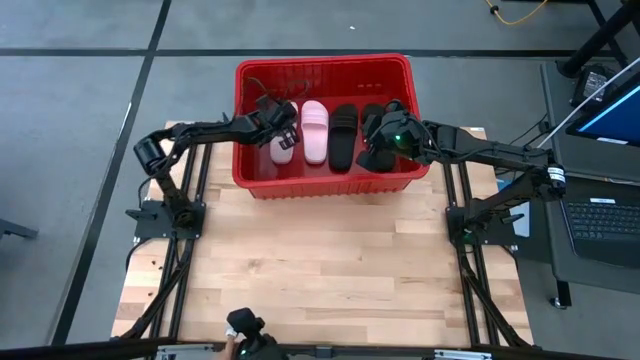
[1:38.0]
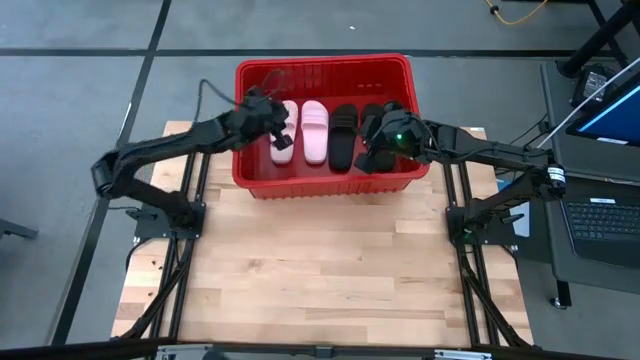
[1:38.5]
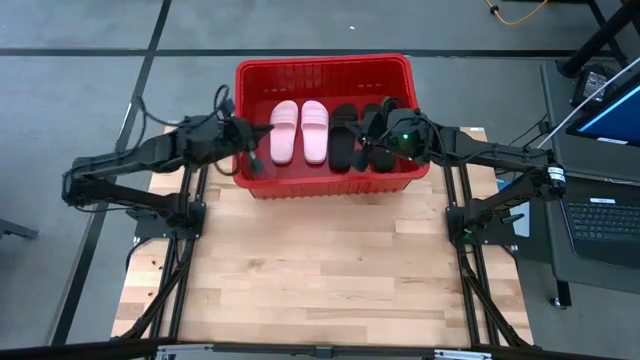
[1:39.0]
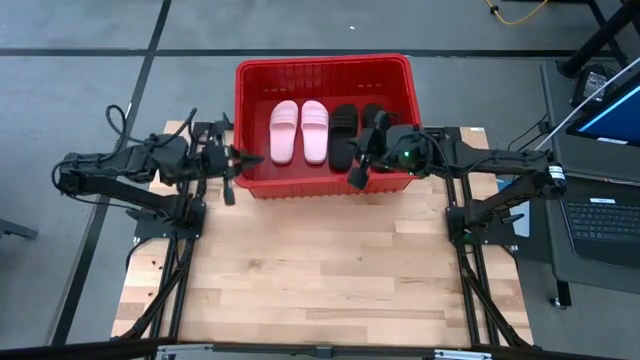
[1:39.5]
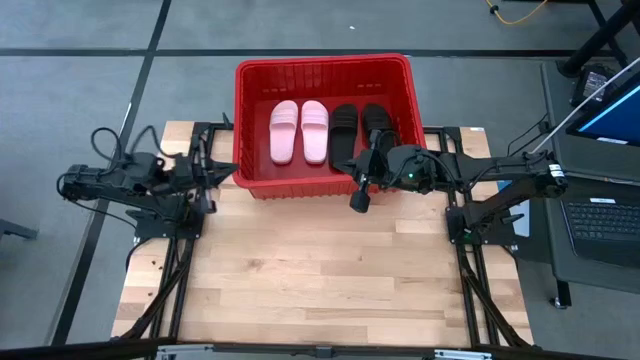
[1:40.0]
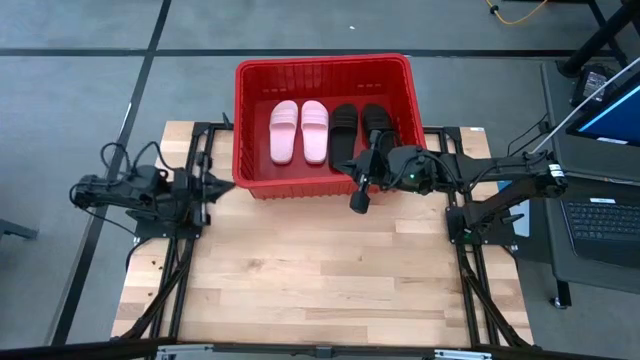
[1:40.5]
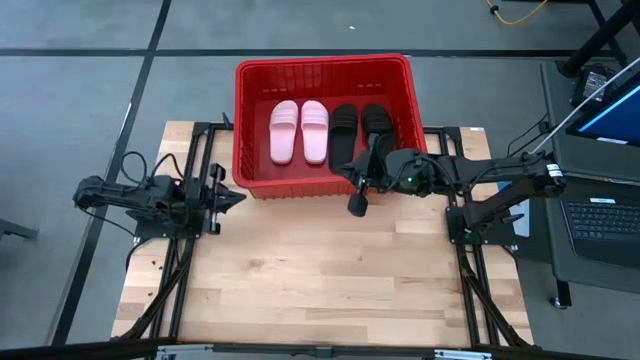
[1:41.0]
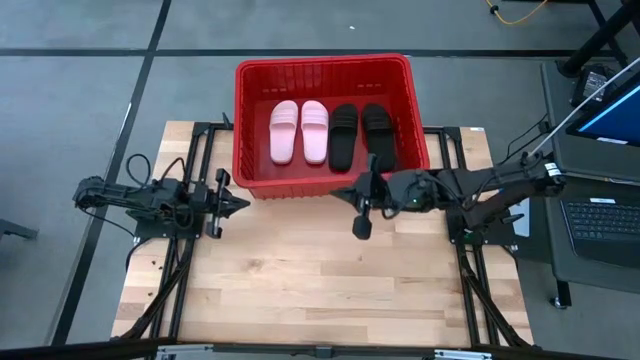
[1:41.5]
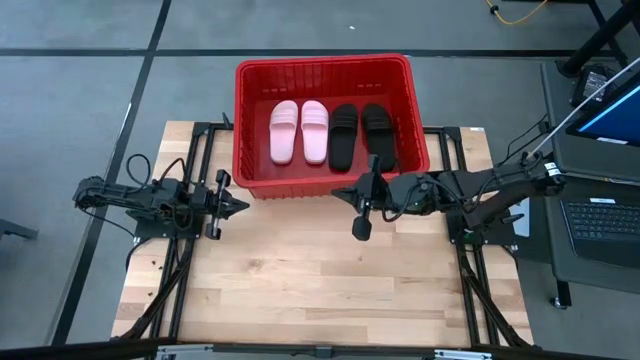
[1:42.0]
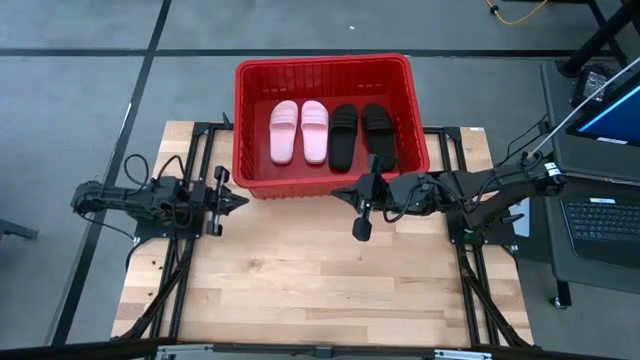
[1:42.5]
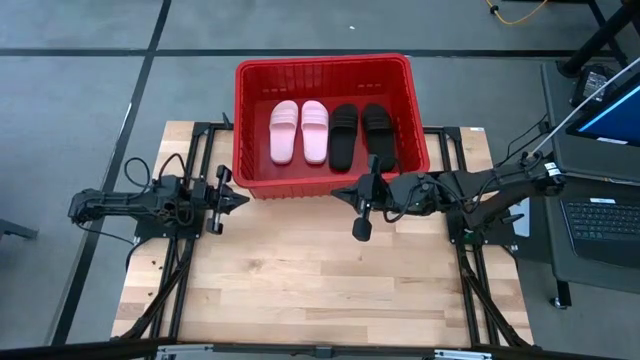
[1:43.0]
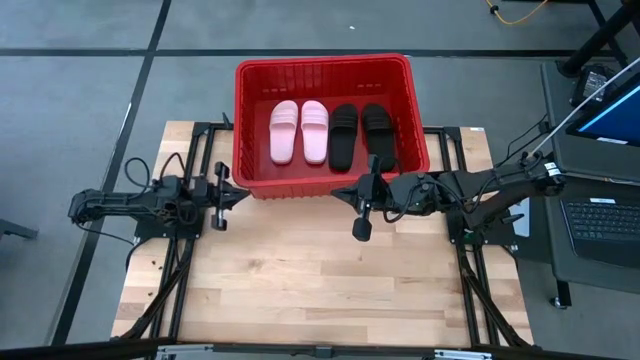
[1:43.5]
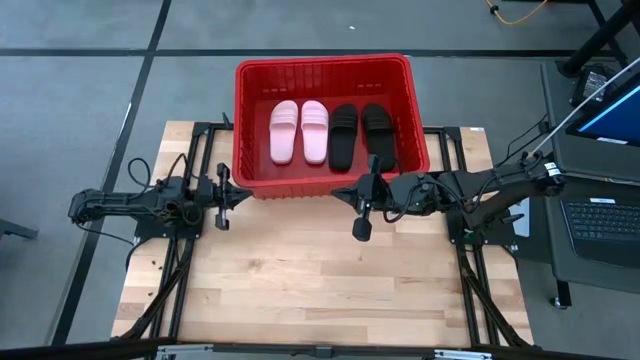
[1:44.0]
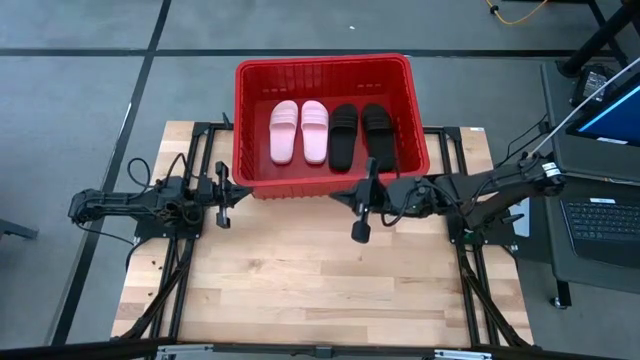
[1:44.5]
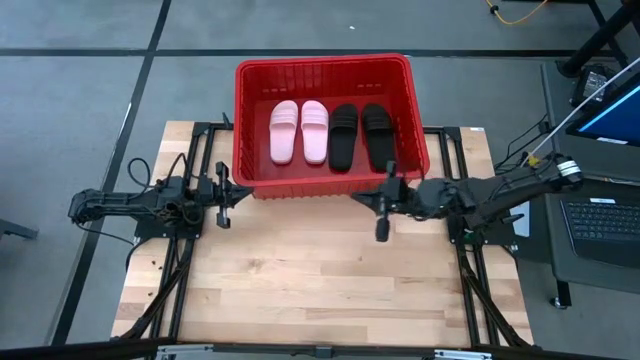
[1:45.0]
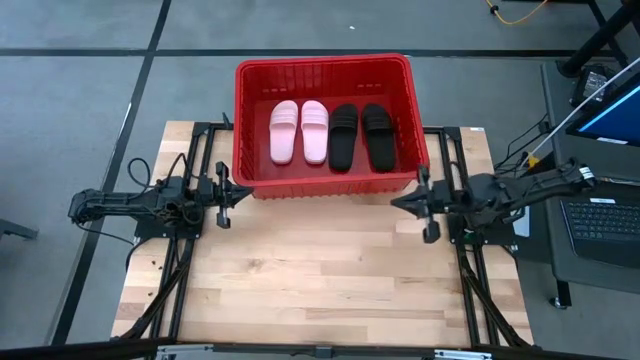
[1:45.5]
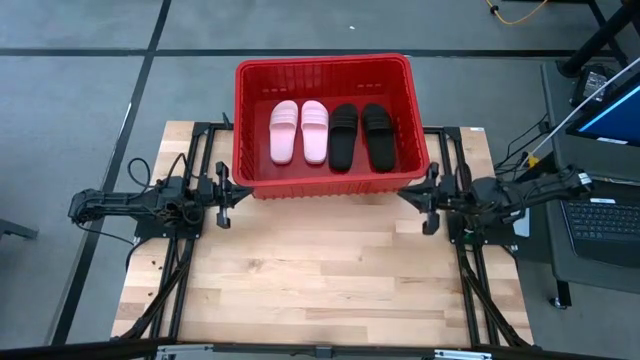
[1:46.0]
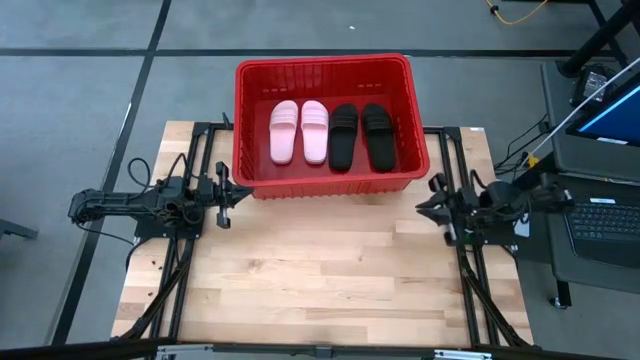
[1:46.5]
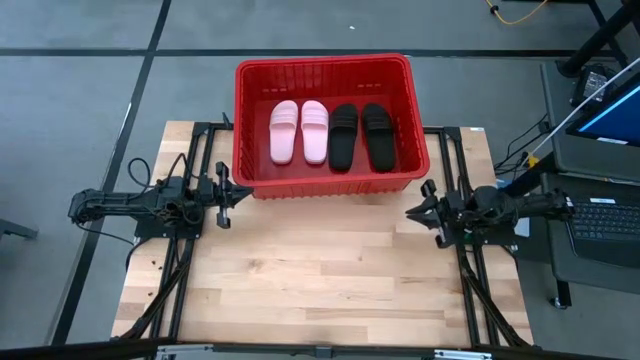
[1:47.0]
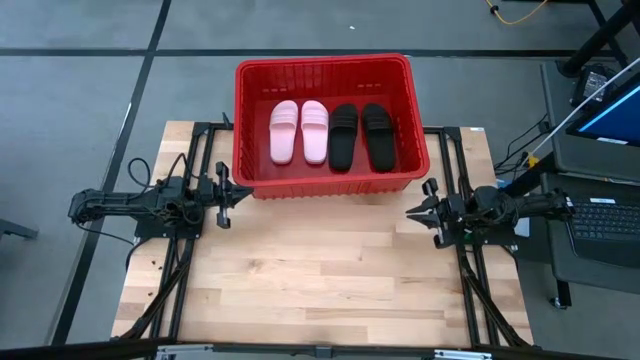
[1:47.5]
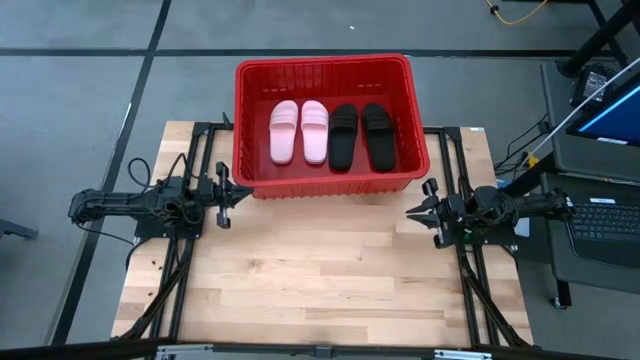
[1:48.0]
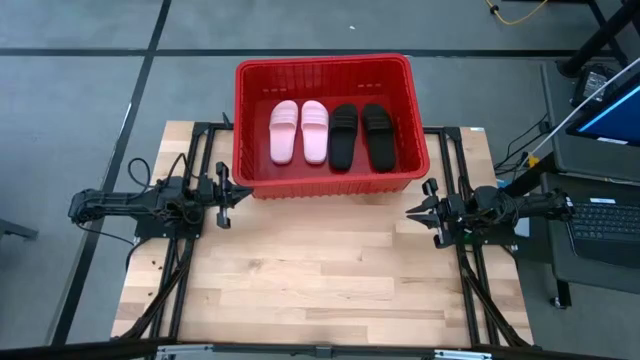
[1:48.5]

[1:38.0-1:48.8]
Task: Pick and place slides into bin
Return to Home Position

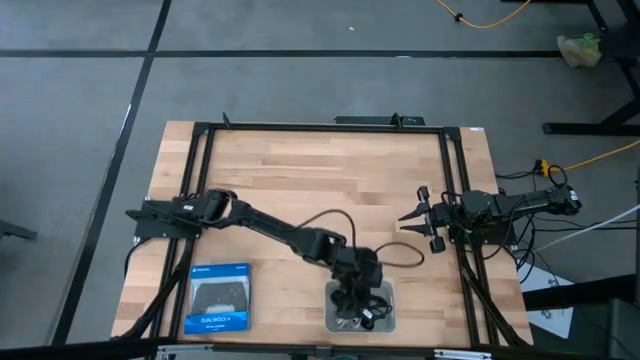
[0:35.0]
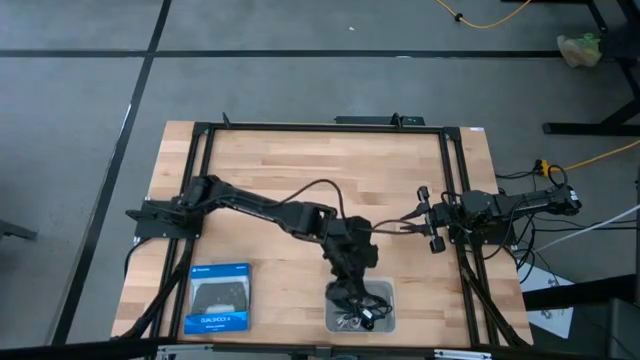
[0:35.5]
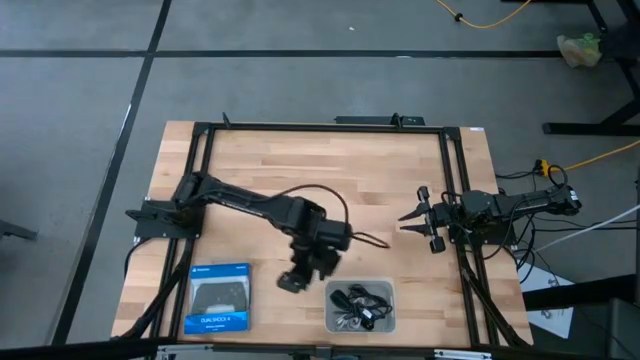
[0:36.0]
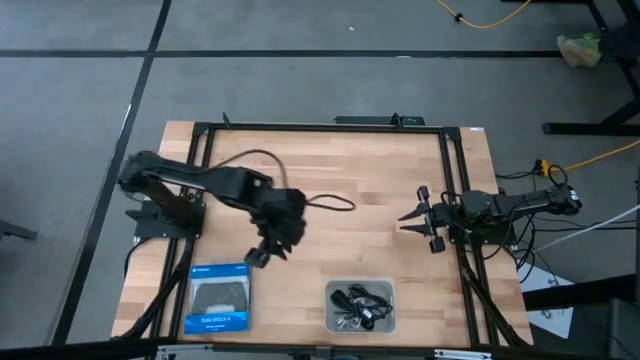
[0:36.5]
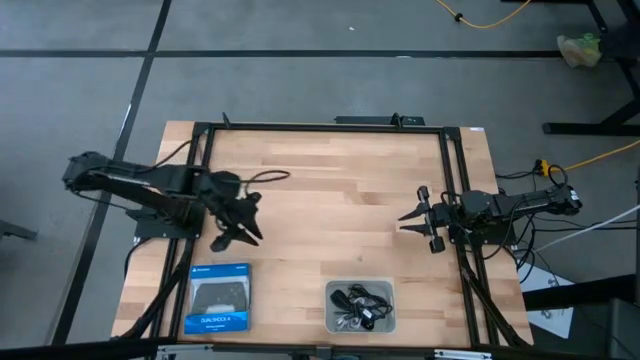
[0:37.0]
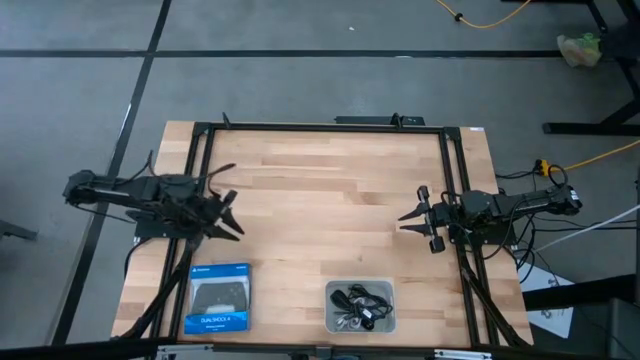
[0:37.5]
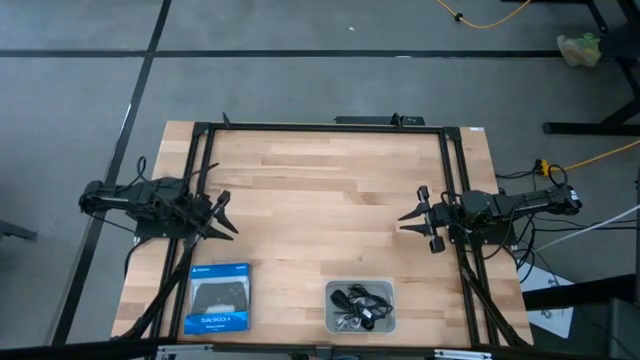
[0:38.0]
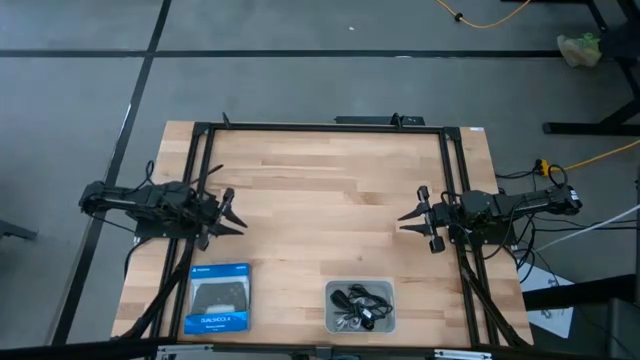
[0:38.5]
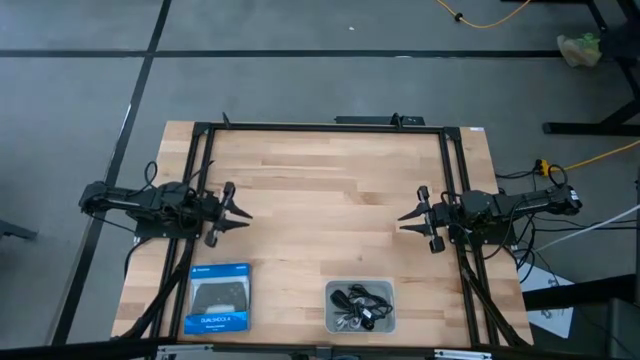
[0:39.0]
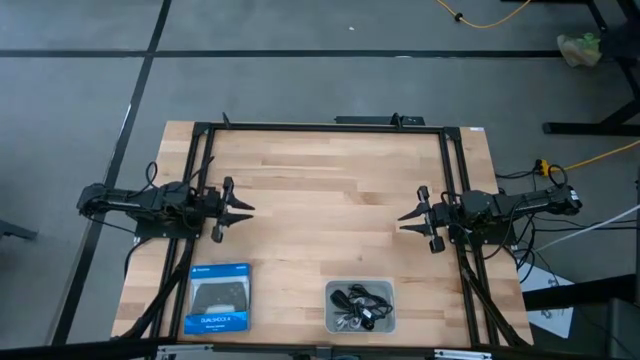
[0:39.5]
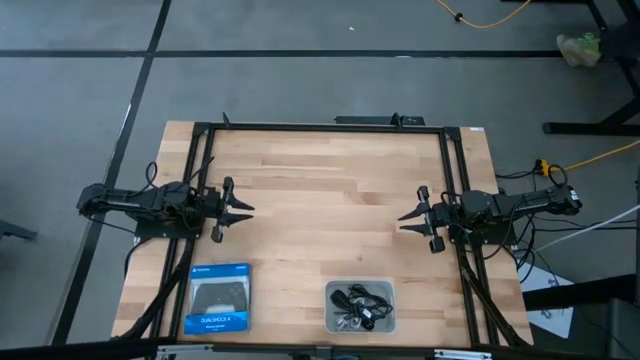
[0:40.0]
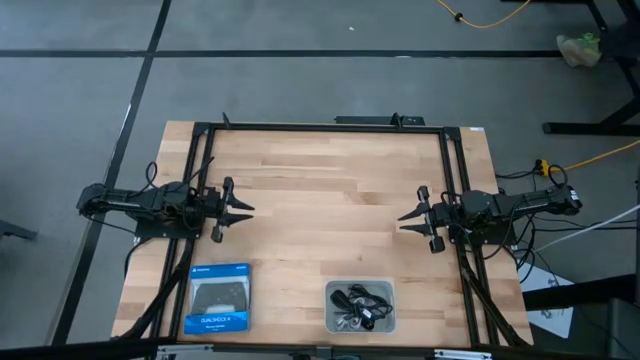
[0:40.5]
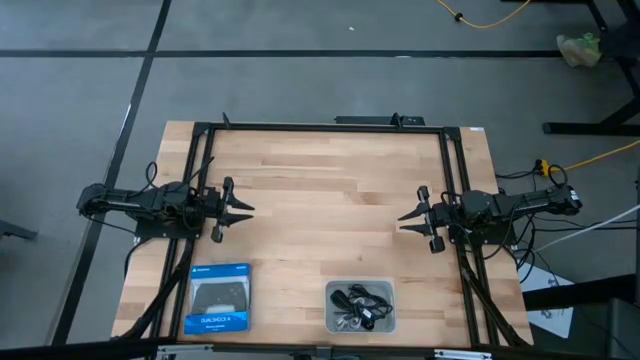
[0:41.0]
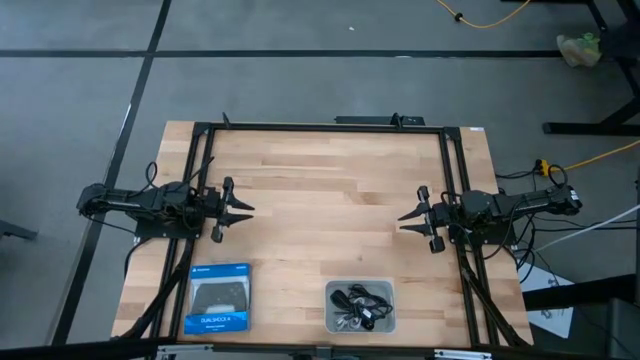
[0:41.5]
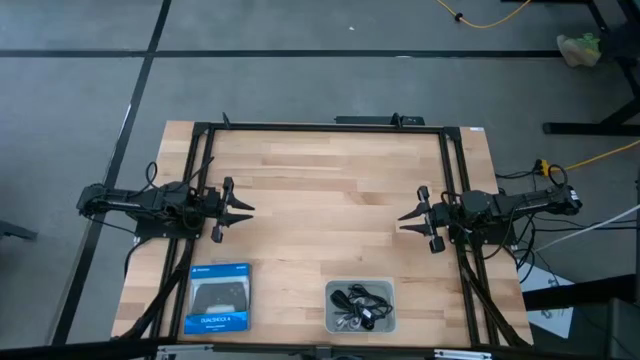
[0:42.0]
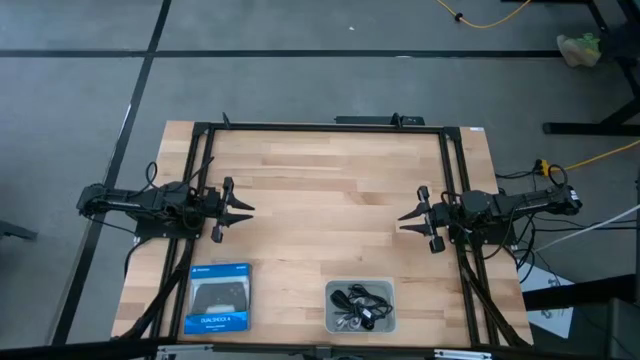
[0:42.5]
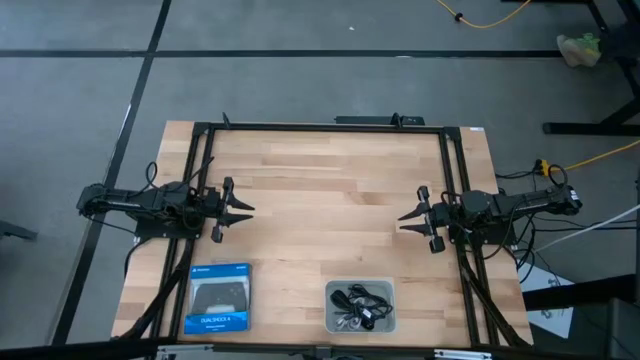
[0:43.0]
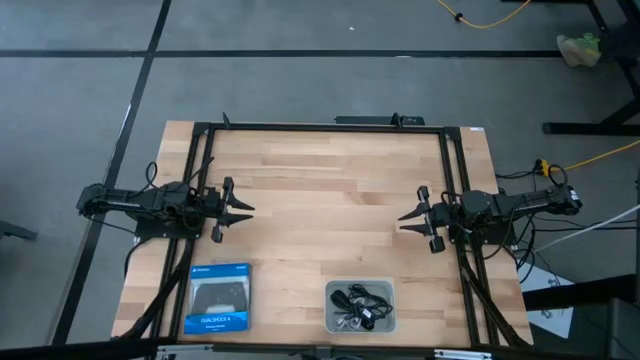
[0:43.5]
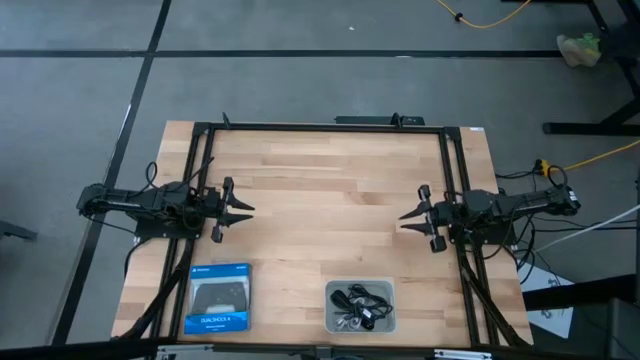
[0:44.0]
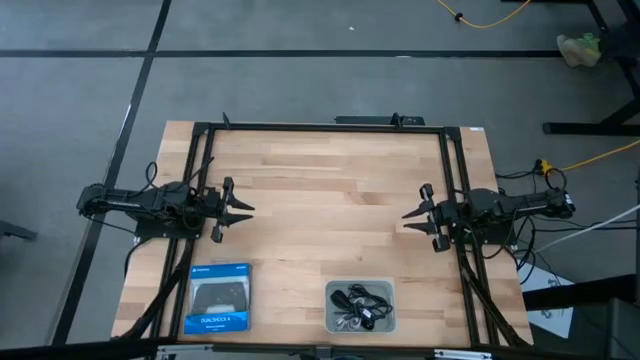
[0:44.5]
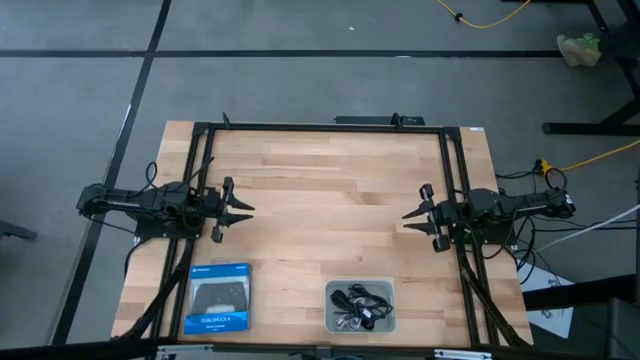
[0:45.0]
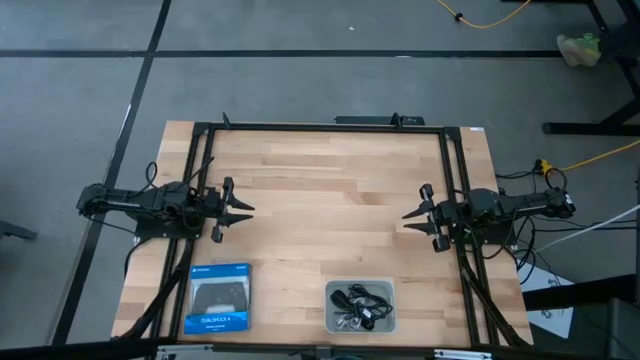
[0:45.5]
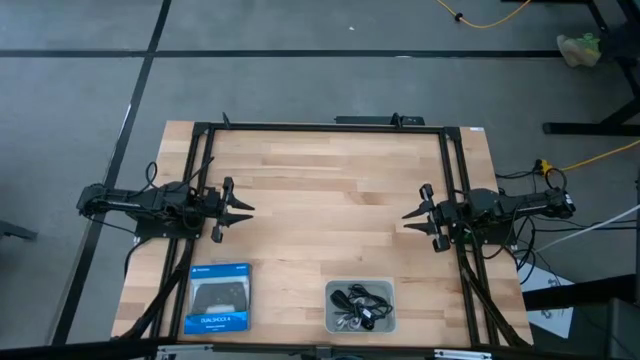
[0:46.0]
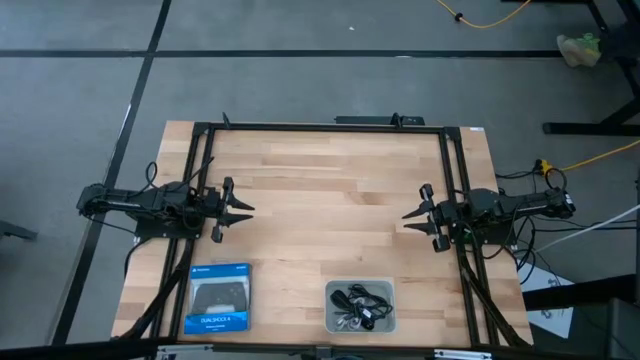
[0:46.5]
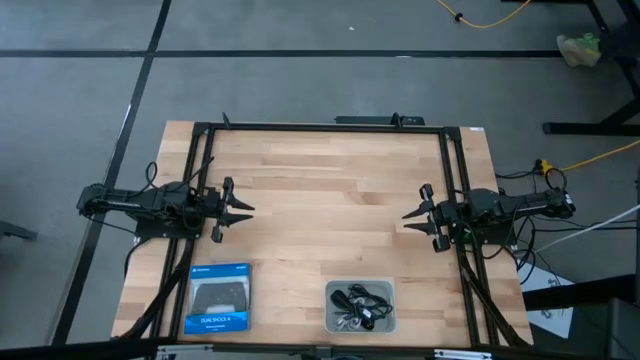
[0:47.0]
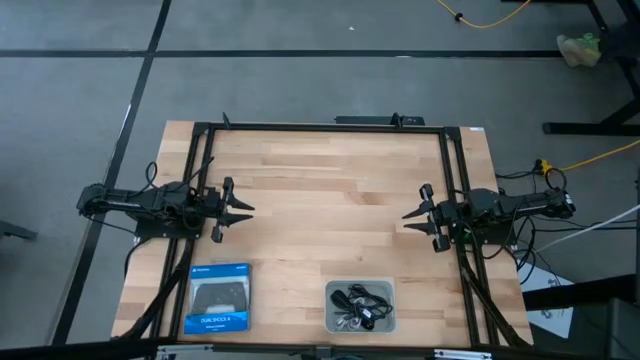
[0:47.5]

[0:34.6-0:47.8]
Task: Pick and place USB-C Cables
Return to Home Position
